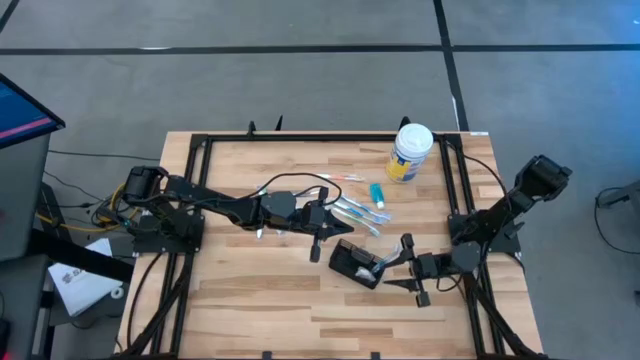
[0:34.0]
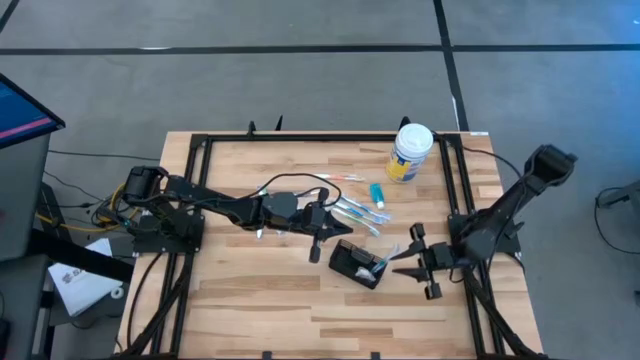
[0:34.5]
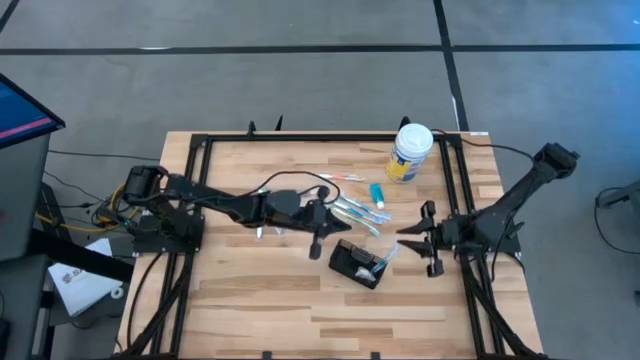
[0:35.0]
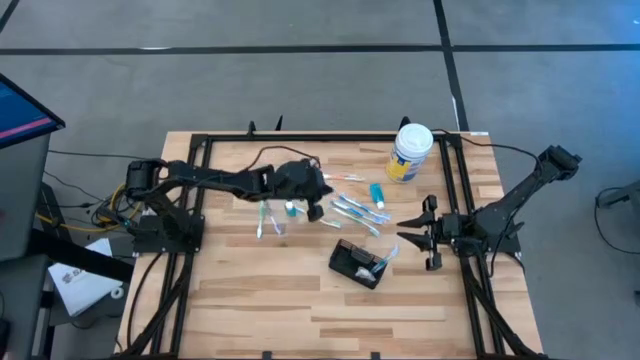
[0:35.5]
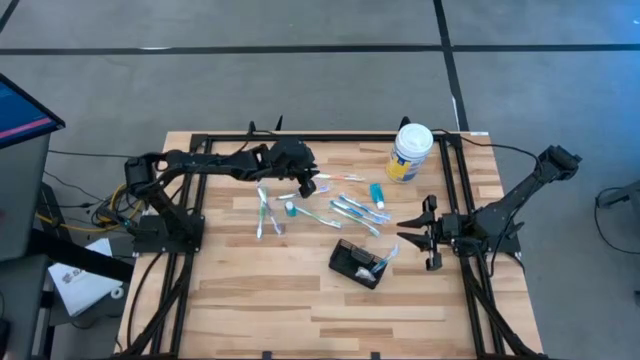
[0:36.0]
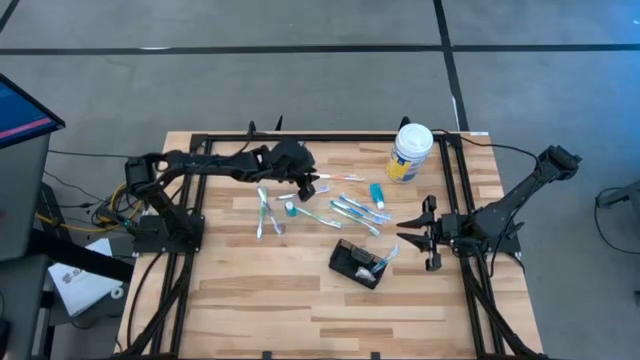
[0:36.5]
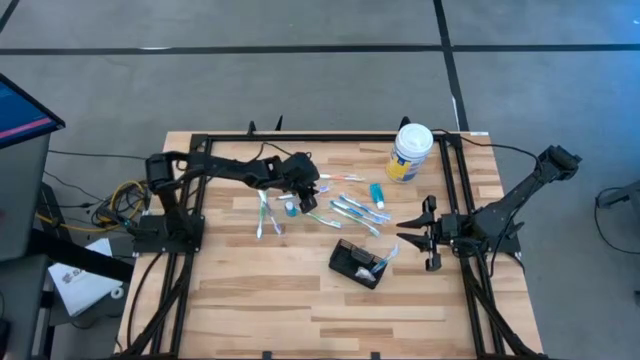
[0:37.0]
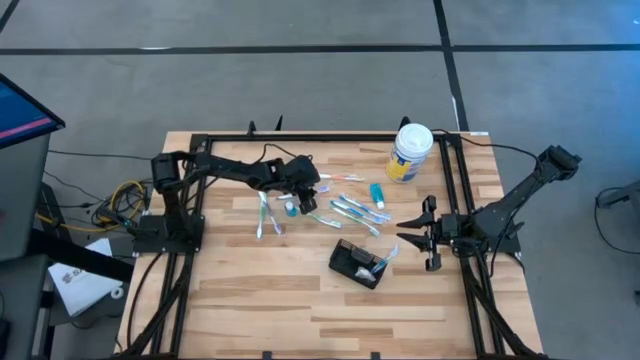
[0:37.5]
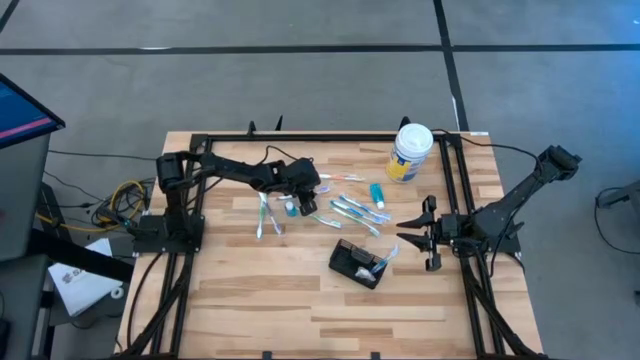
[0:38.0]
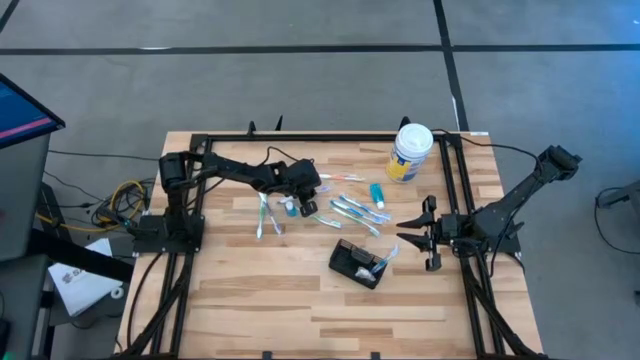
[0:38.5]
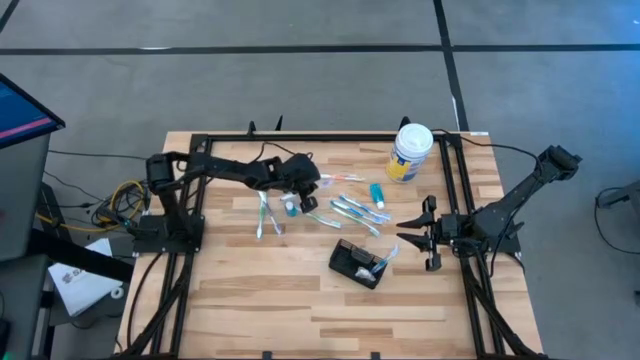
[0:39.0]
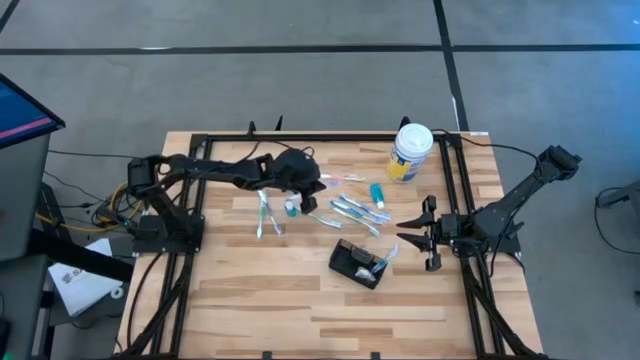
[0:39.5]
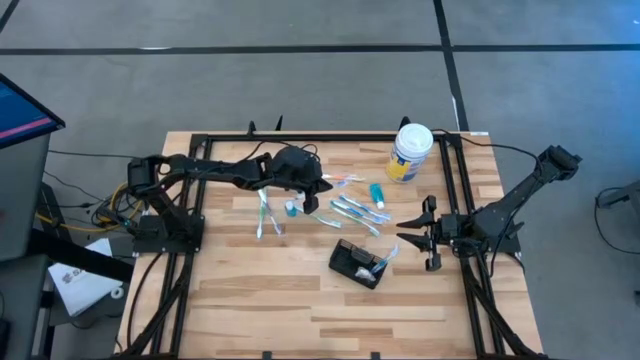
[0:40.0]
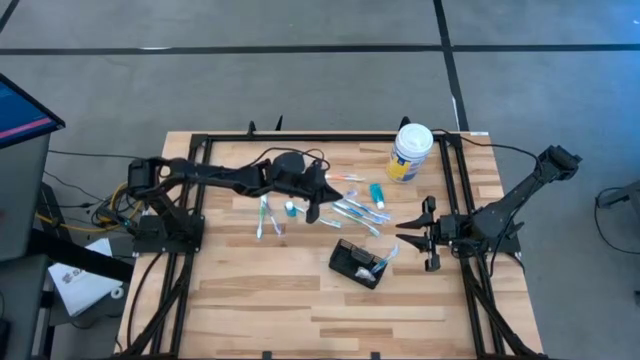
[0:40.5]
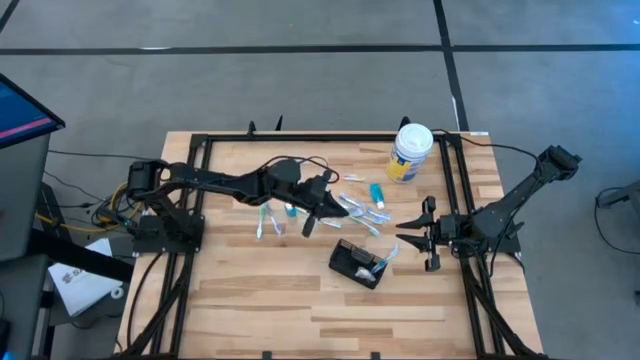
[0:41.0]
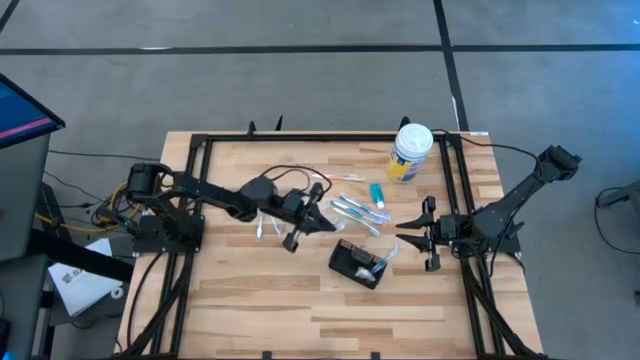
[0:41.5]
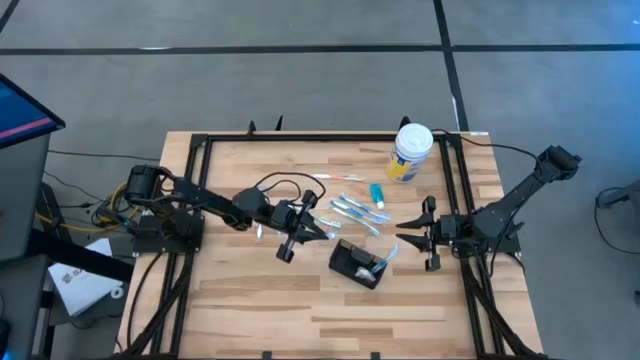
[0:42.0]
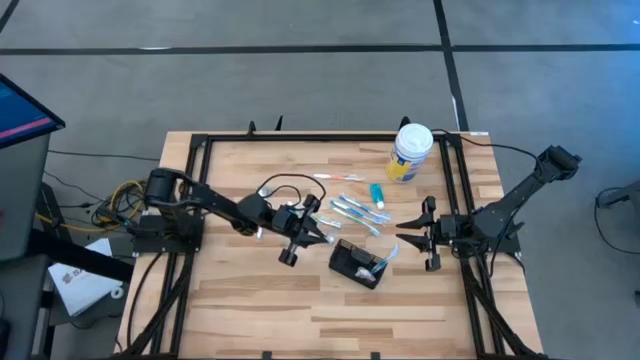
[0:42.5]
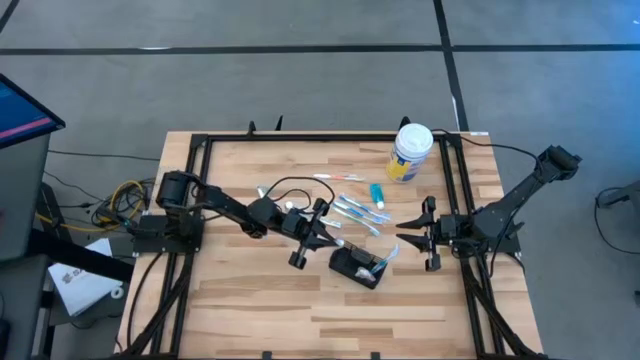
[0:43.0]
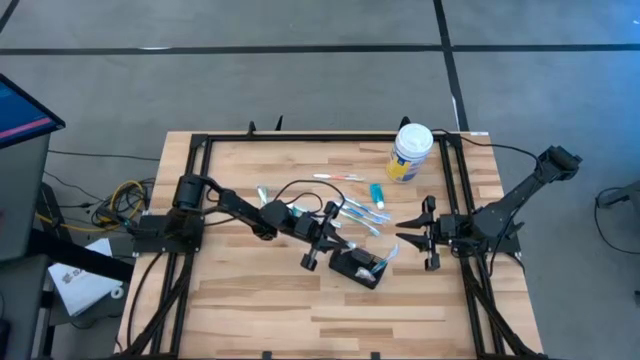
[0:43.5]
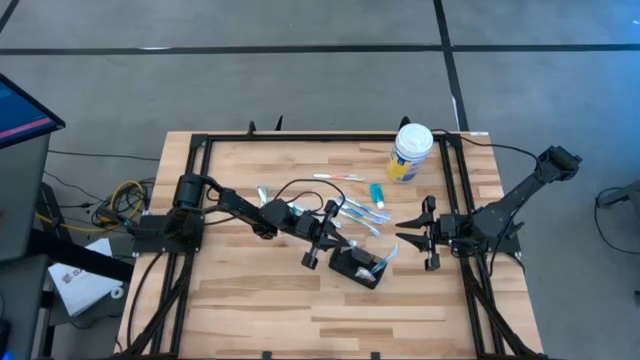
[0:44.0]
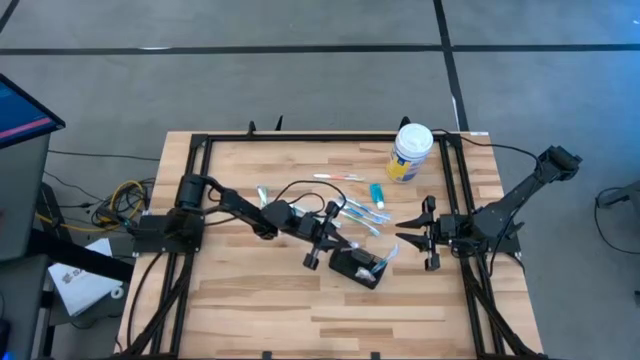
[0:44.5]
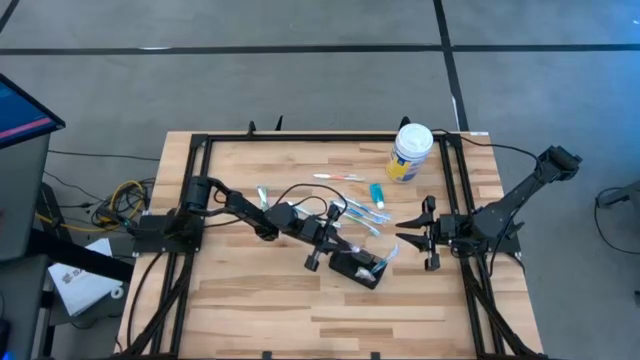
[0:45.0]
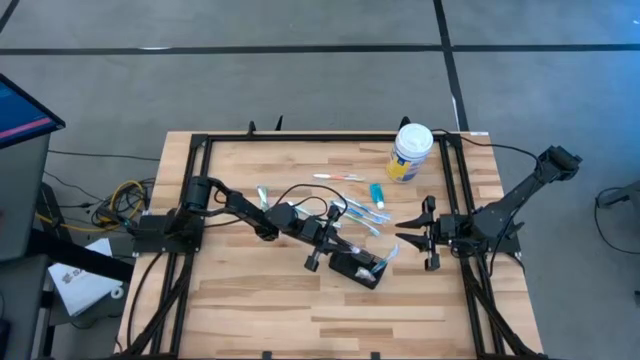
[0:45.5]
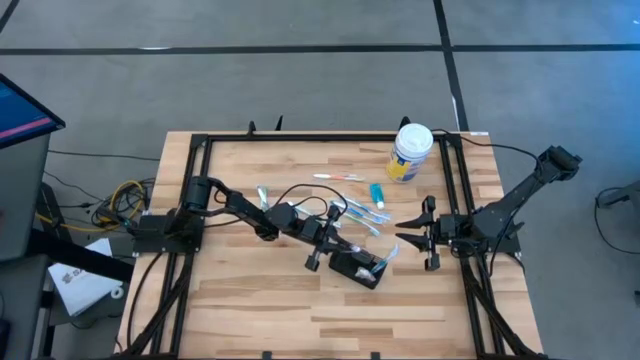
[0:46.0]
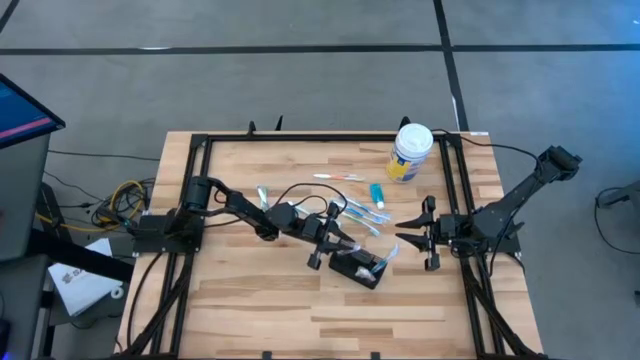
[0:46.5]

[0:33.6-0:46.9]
Task: Pick & Place toothbrushing station
Put the top violet toothbrush into the mesh organizer

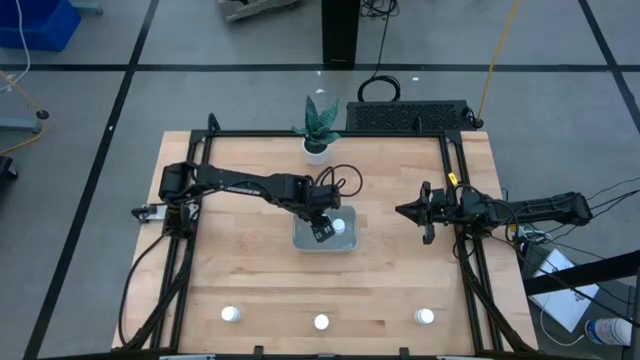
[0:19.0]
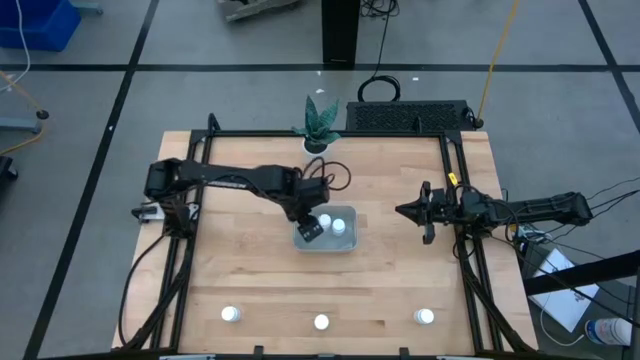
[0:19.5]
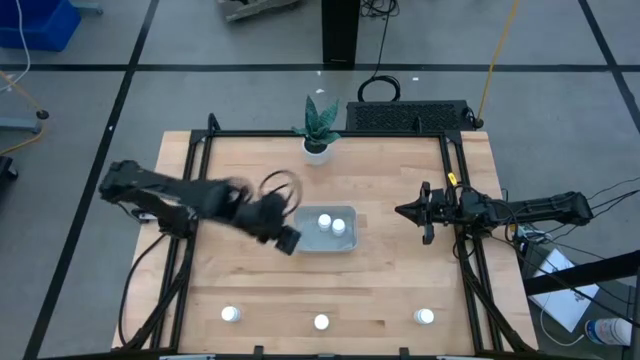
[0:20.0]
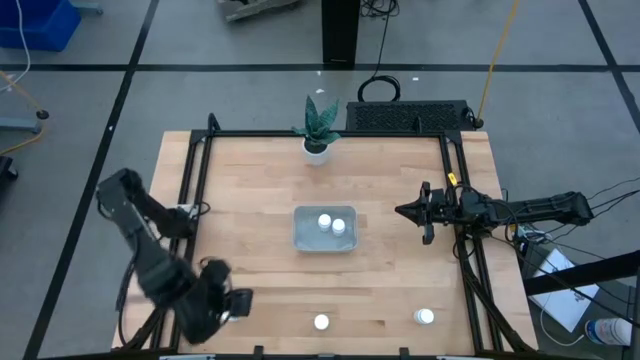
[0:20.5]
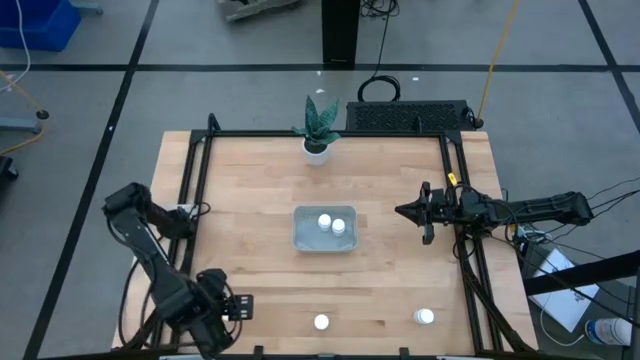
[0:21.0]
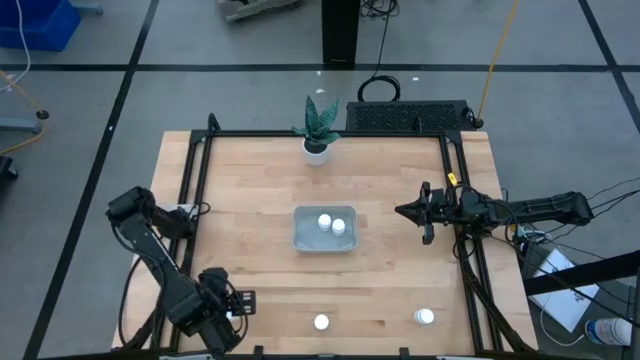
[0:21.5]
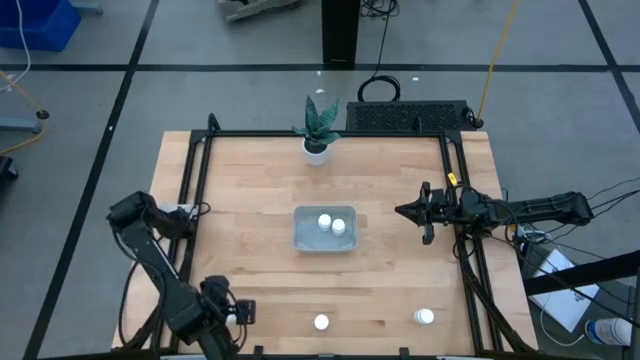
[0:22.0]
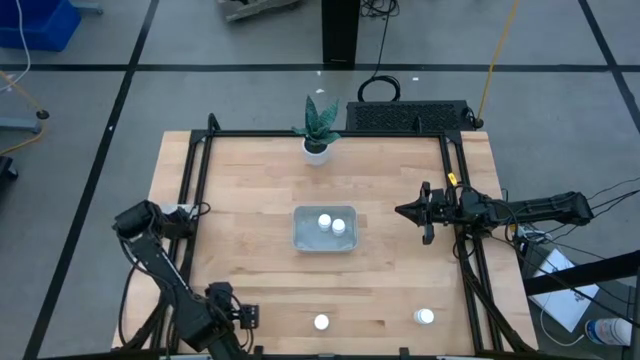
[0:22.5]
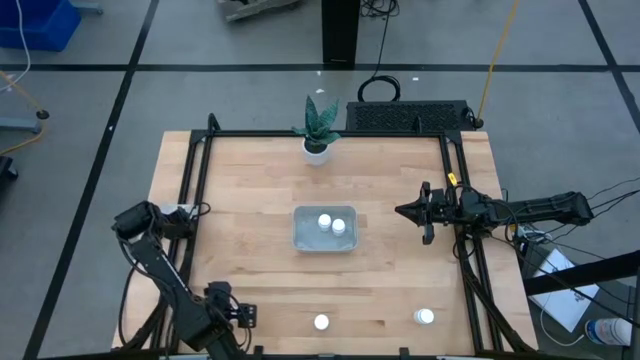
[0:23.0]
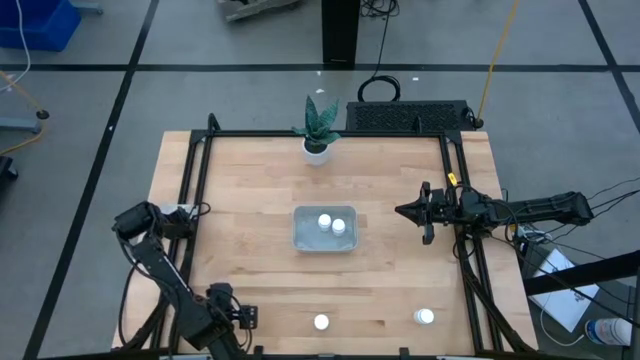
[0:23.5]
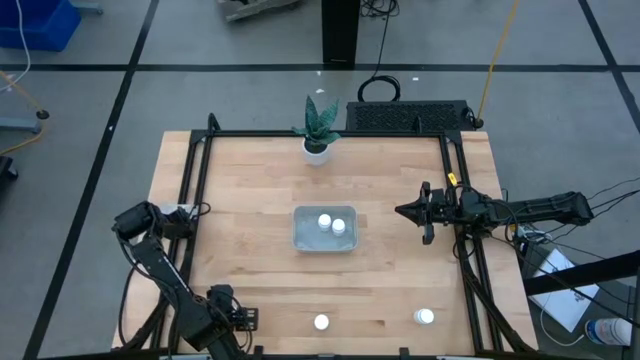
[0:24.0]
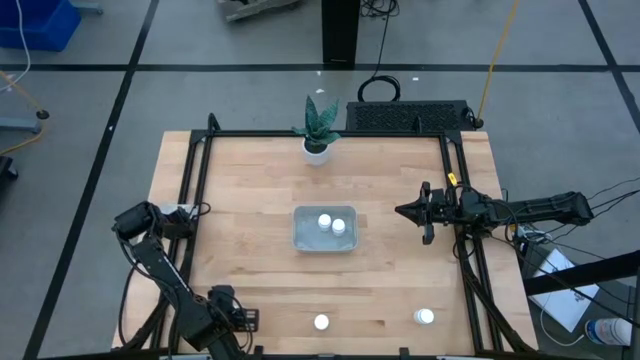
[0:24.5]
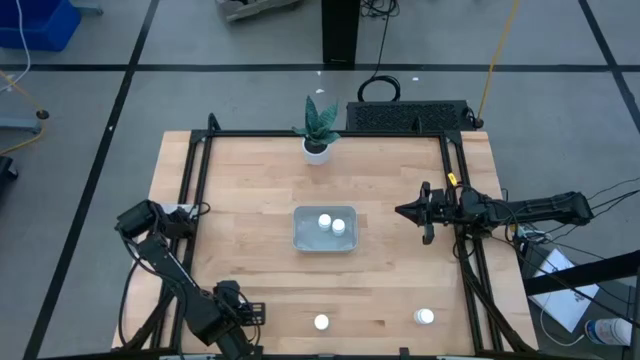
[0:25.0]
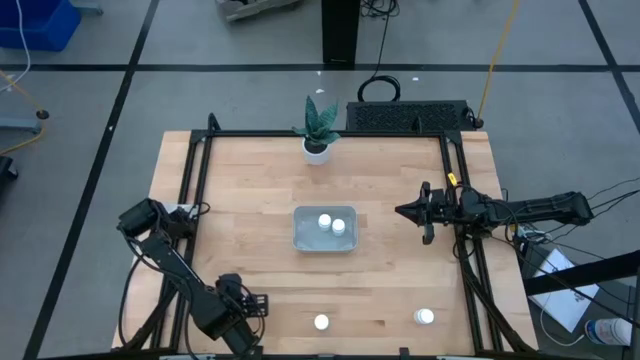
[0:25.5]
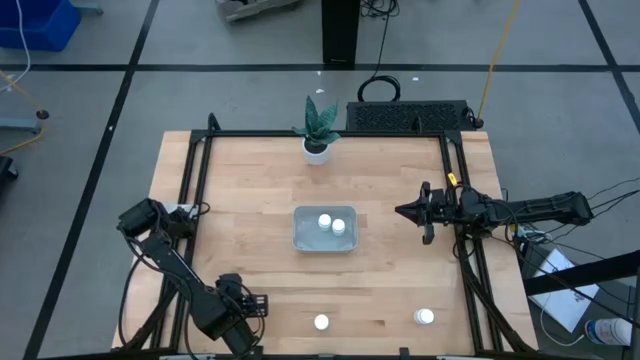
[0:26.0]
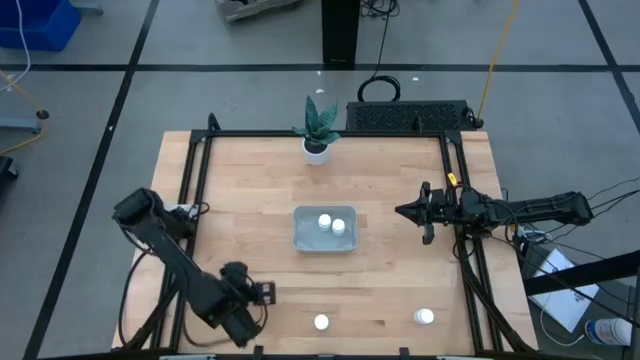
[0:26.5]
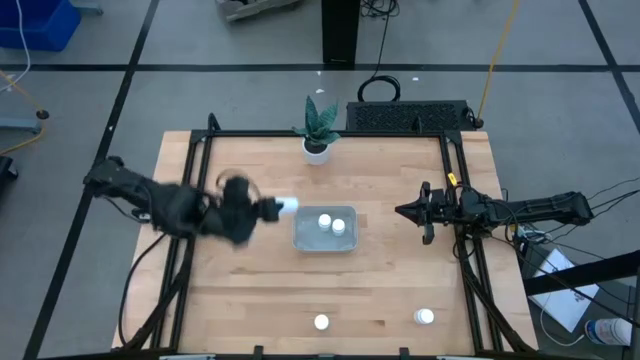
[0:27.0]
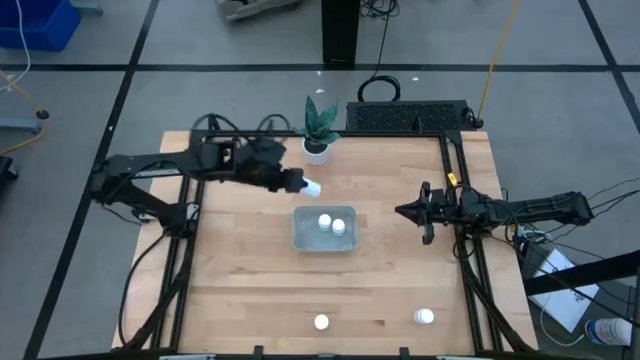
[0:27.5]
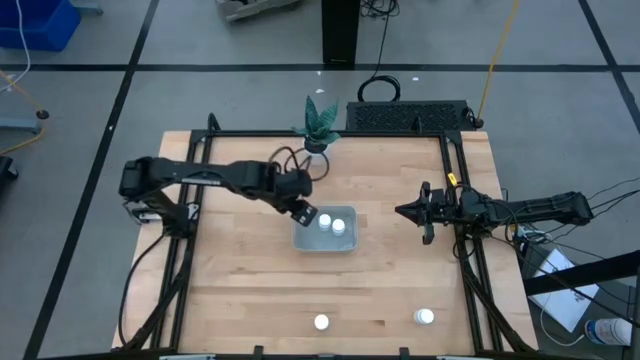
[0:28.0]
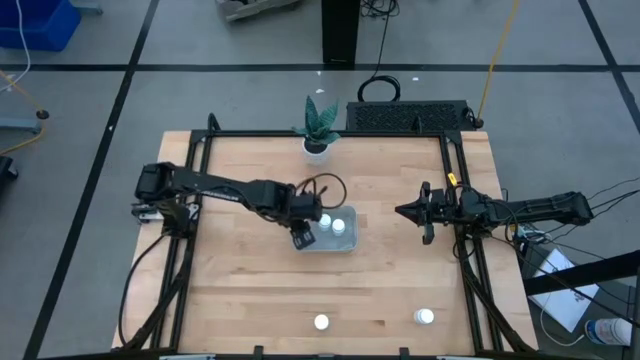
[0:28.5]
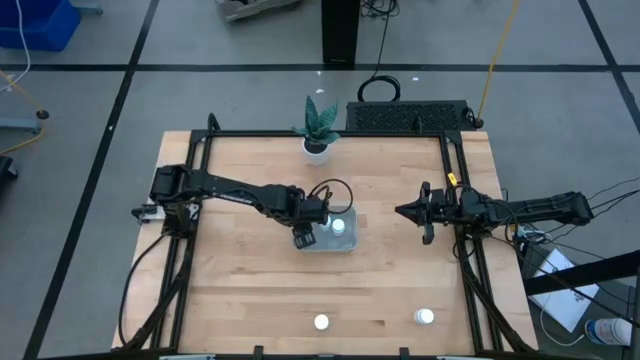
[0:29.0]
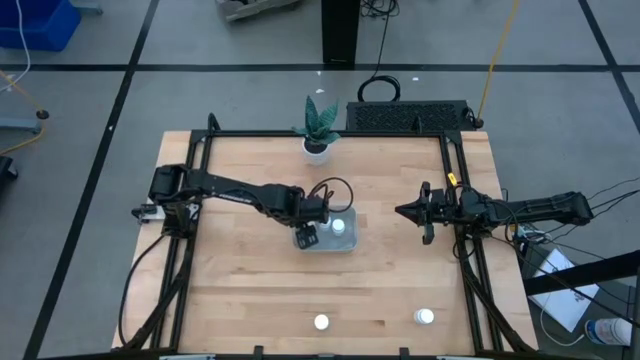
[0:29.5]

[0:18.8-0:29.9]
Task: Pick and place pill bottles into a basket
Put the white pill bottle into the gray bin
